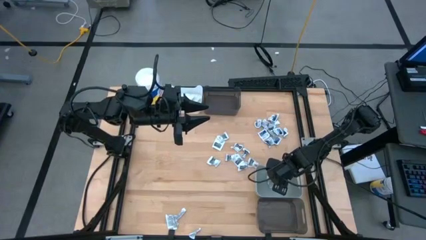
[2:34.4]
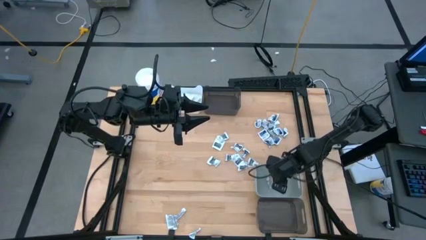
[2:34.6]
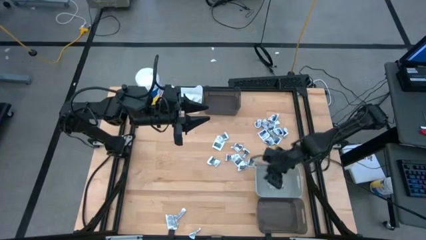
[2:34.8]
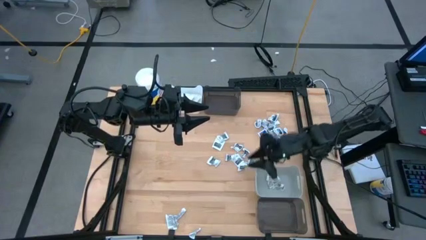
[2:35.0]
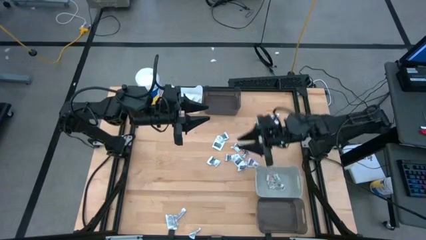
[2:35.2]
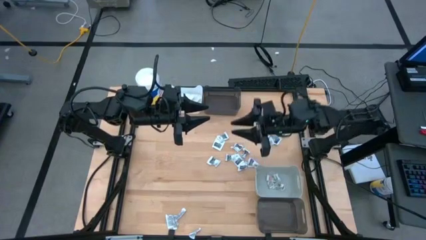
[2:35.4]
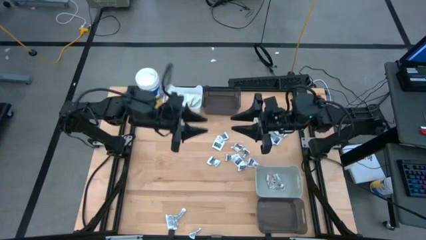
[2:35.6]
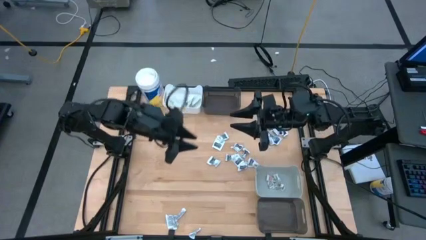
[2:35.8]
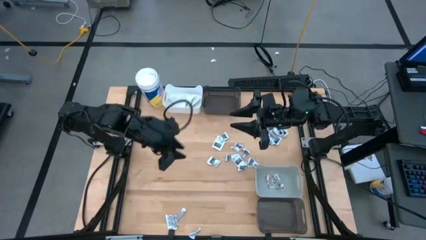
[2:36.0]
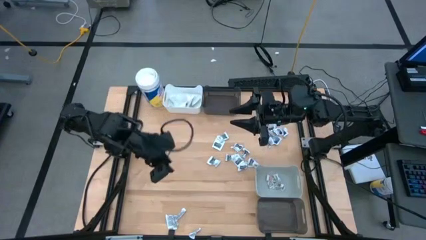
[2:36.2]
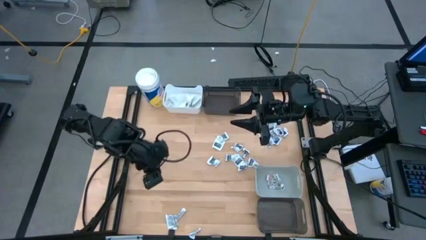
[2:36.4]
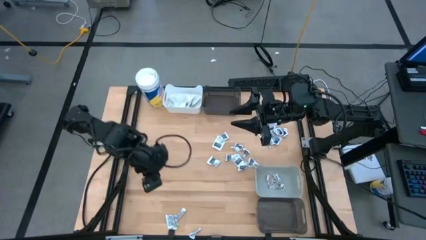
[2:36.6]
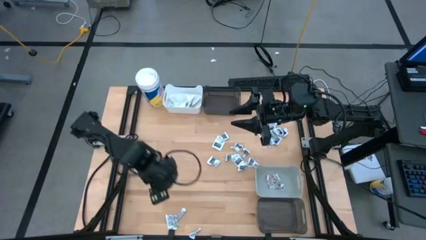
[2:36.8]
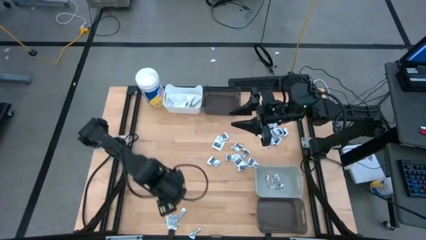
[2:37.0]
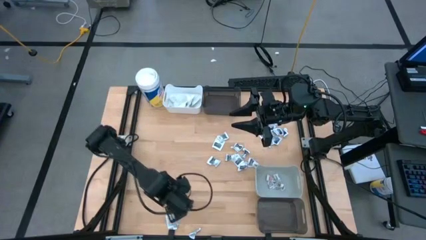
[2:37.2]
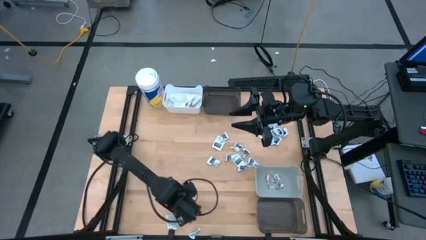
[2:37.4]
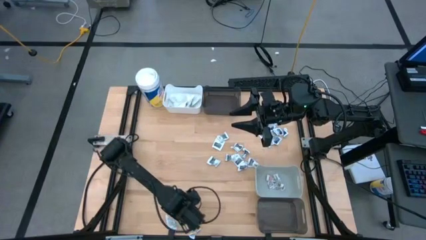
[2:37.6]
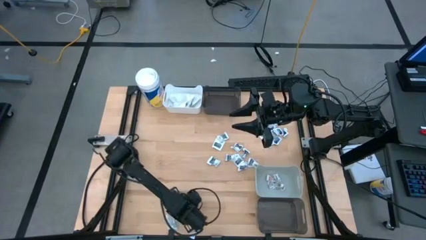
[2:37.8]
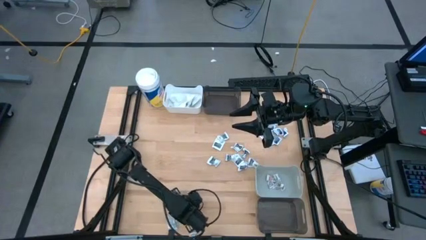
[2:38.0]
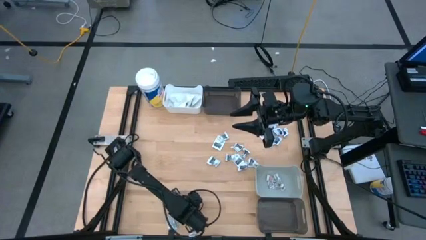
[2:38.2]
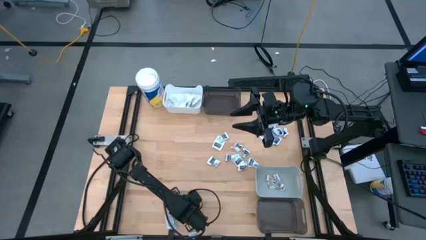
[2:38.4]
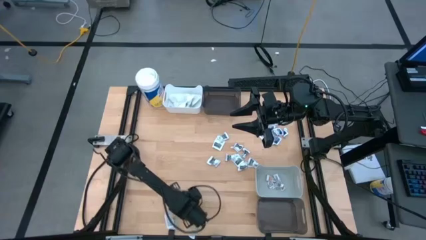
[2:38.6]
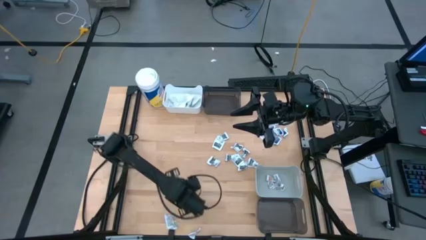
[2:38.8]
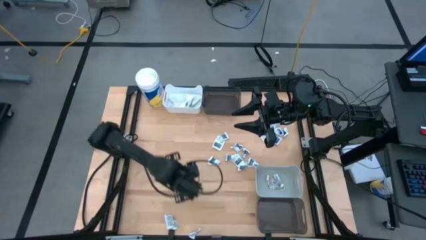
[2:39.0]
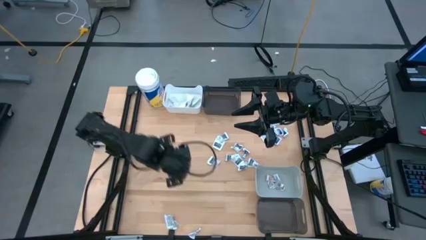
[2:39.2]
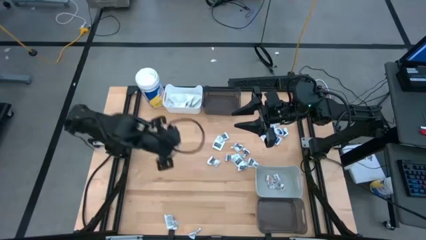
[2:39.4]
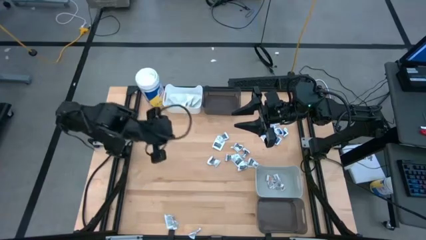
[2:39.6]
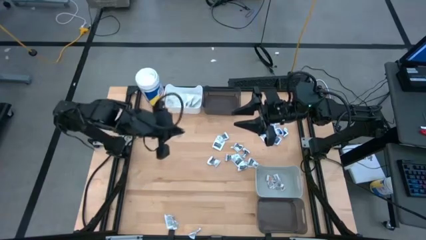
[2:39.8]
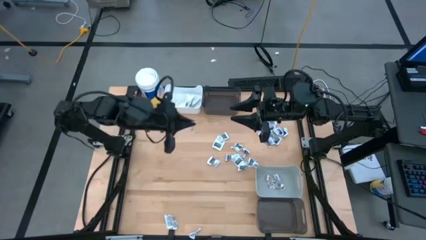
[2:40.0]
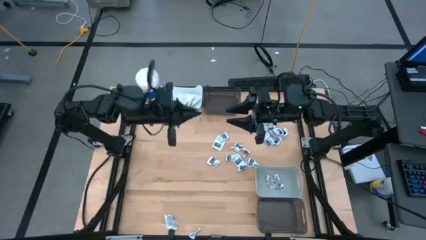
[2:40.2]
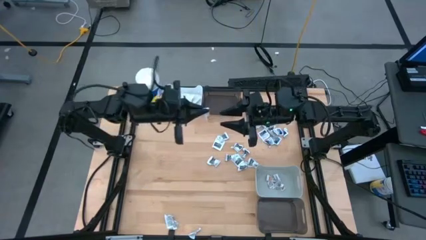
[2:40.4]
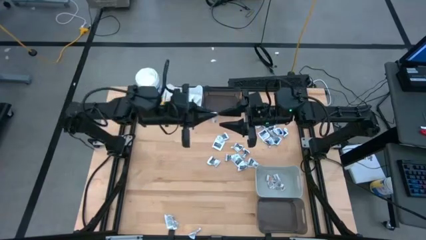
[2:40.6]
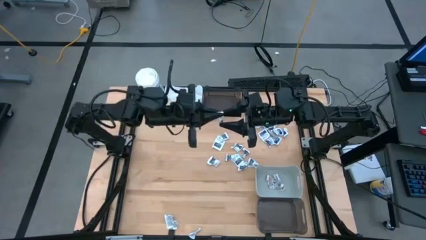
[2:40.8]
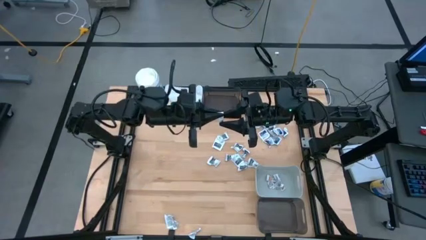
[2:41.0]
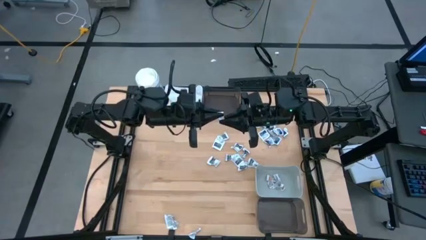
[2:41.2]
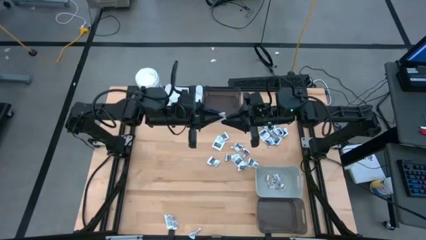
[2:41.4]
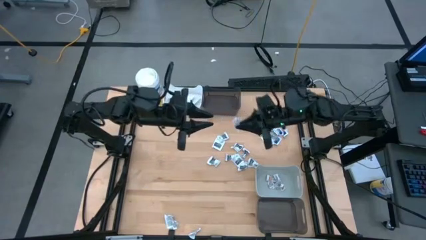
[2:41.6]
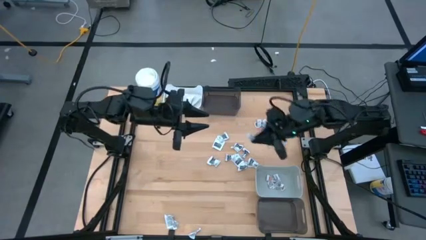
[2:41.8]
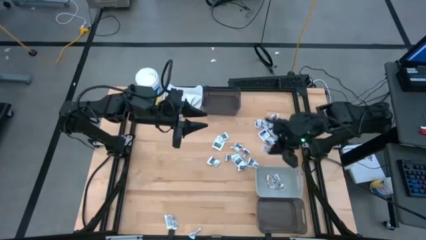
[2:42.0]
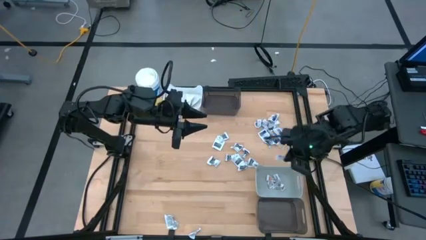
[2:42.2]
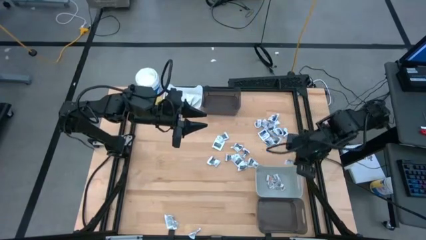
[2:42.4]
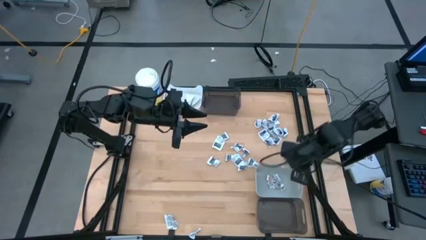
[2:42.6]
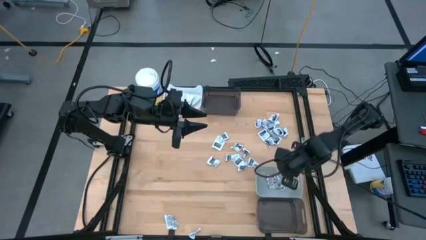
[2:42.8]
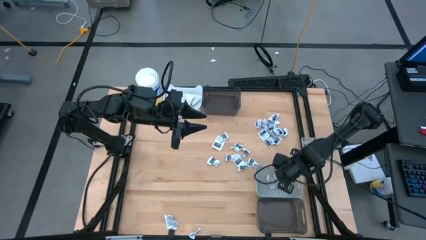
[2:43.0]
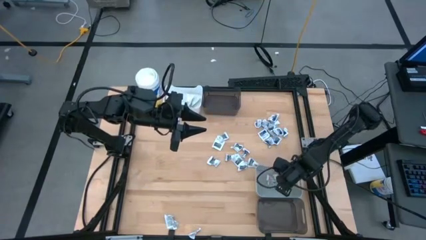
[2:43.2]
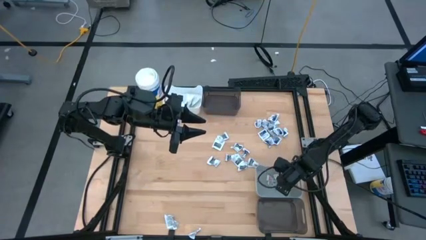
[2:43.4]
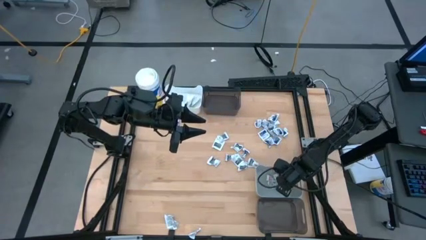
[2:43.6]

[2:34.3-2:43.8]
Task: Pick & Place First Aid Supplies
Put the orange ointment pack into the gray bin

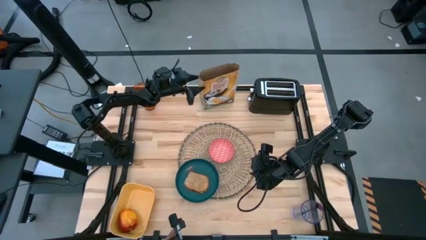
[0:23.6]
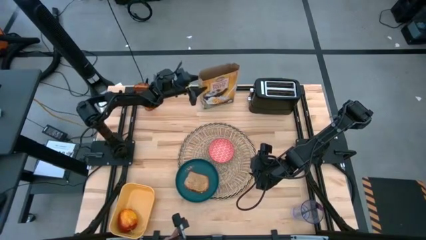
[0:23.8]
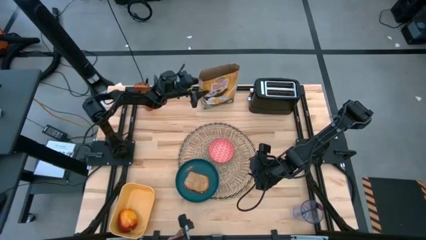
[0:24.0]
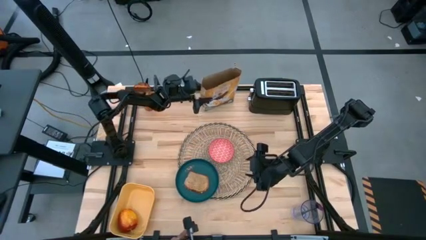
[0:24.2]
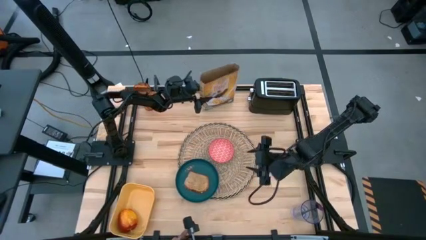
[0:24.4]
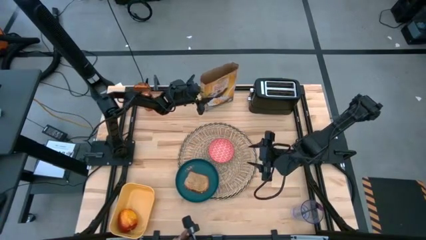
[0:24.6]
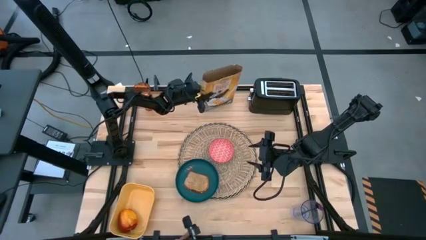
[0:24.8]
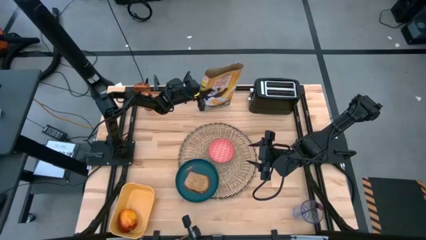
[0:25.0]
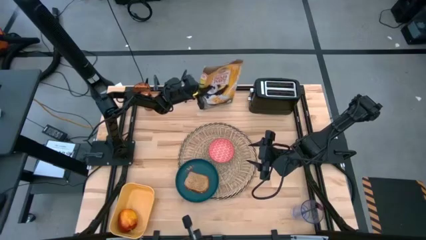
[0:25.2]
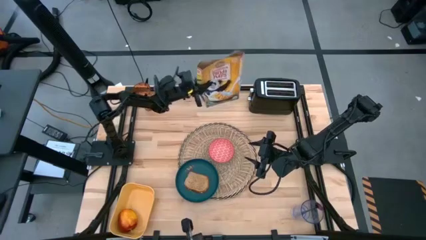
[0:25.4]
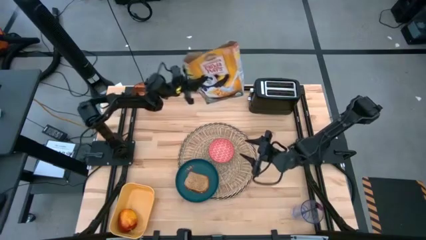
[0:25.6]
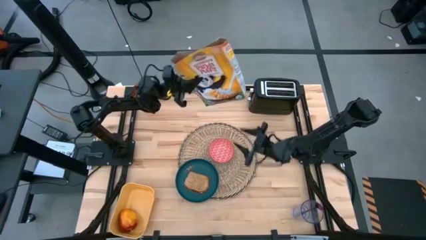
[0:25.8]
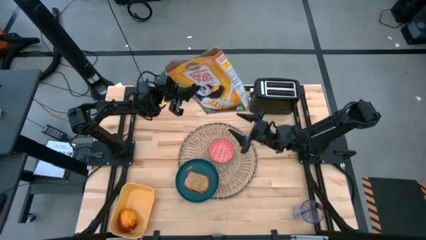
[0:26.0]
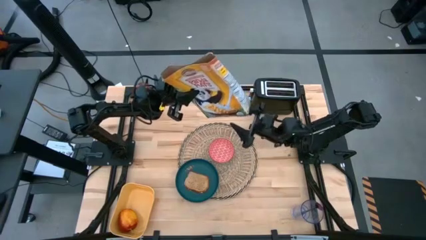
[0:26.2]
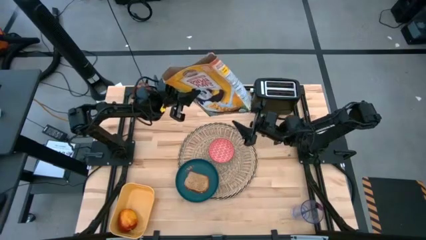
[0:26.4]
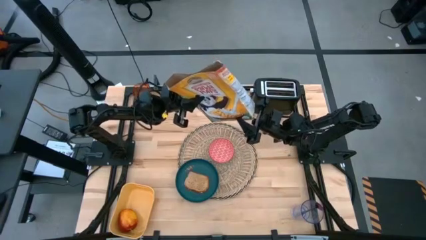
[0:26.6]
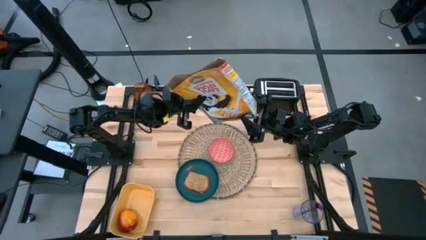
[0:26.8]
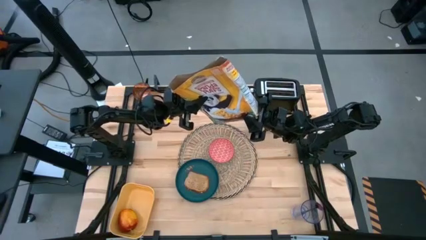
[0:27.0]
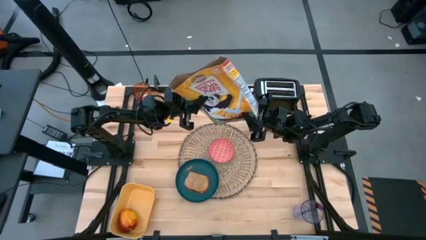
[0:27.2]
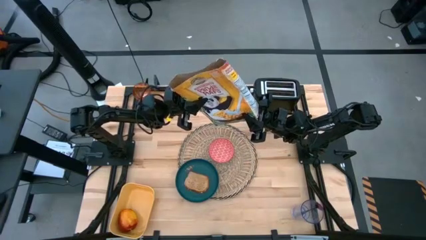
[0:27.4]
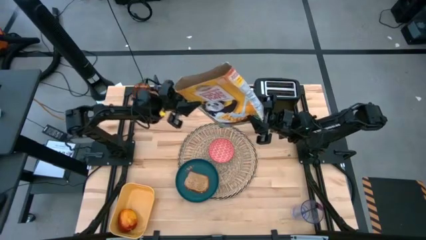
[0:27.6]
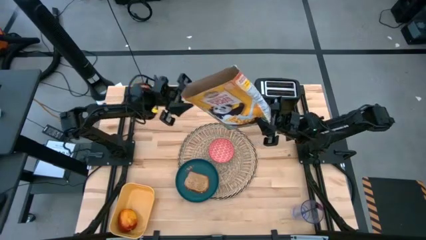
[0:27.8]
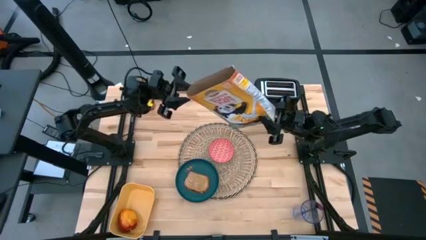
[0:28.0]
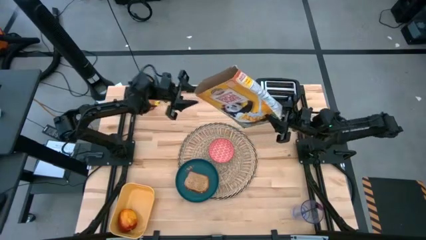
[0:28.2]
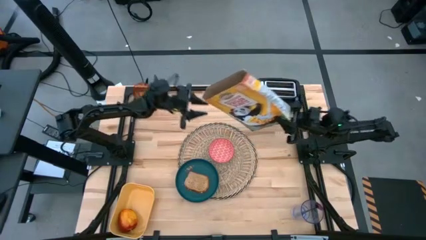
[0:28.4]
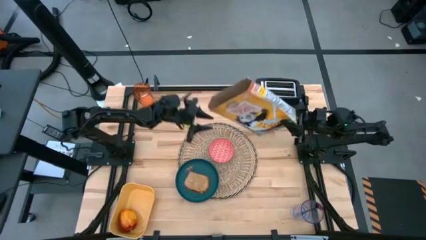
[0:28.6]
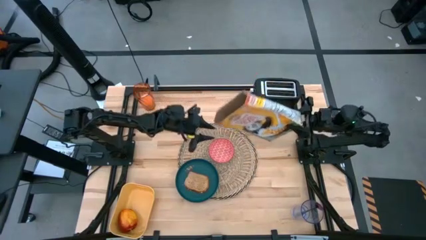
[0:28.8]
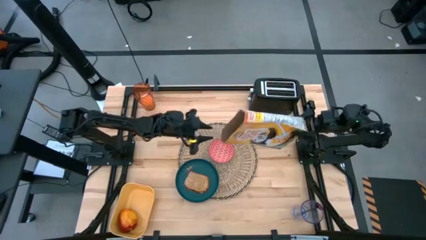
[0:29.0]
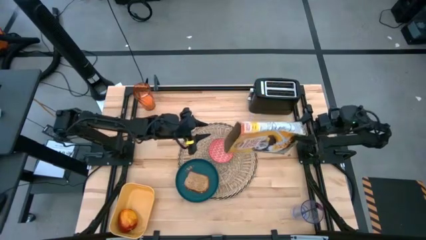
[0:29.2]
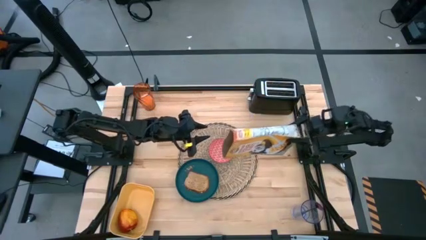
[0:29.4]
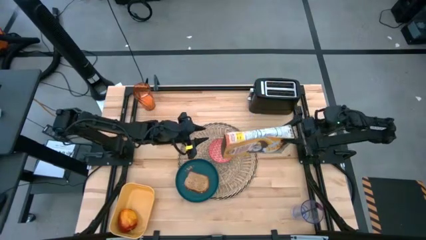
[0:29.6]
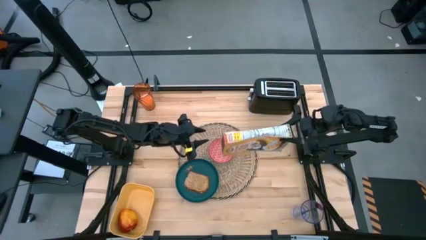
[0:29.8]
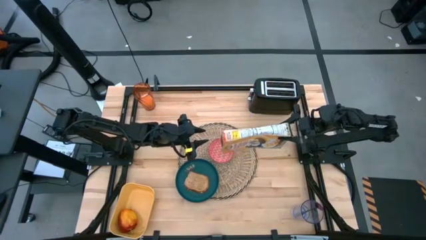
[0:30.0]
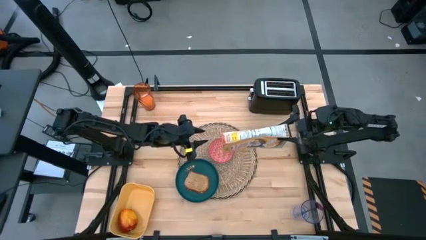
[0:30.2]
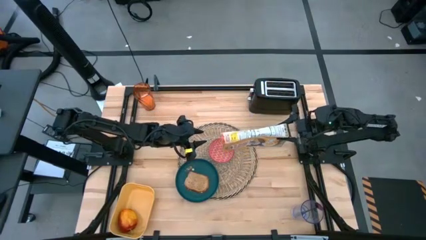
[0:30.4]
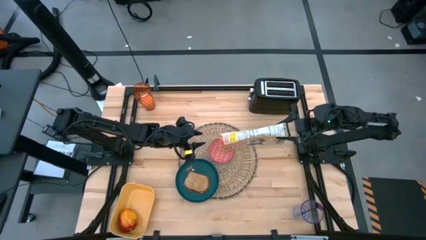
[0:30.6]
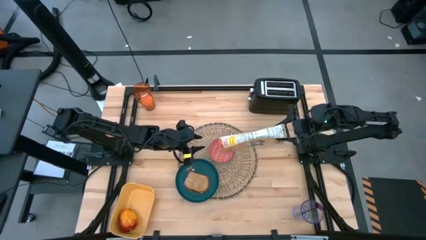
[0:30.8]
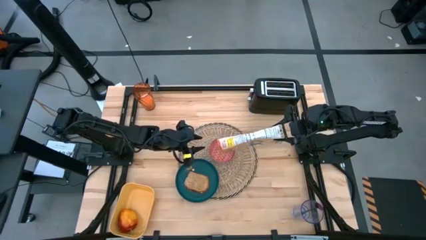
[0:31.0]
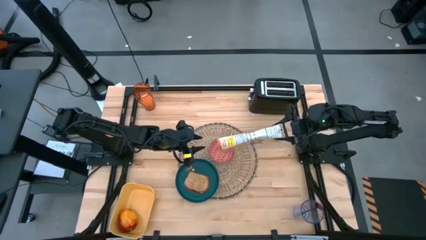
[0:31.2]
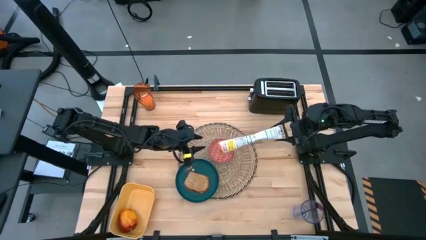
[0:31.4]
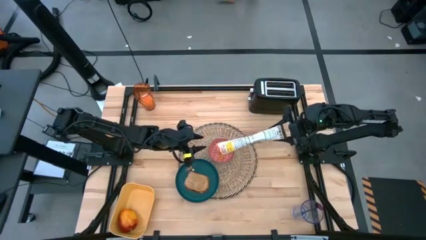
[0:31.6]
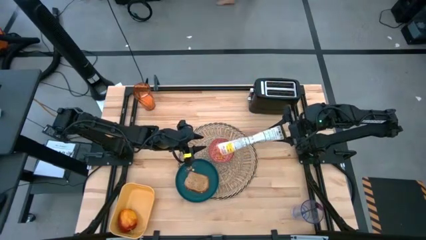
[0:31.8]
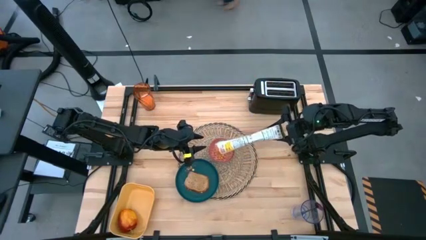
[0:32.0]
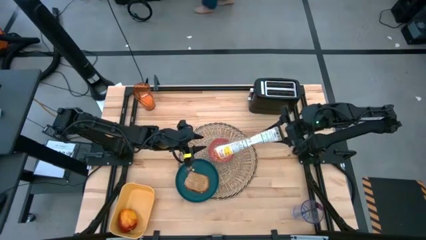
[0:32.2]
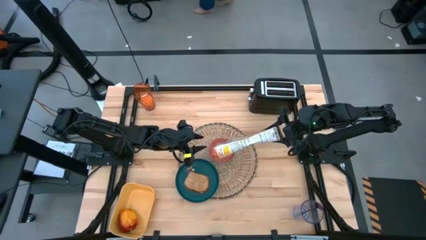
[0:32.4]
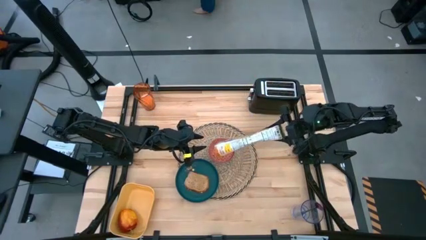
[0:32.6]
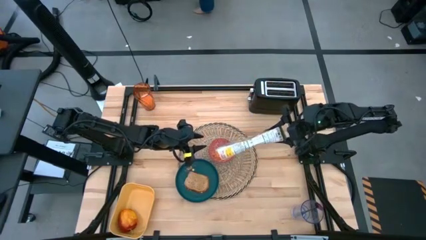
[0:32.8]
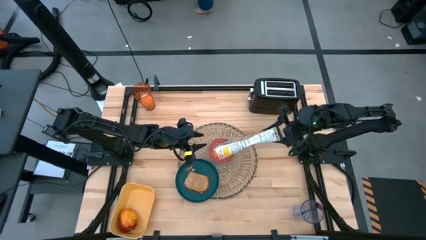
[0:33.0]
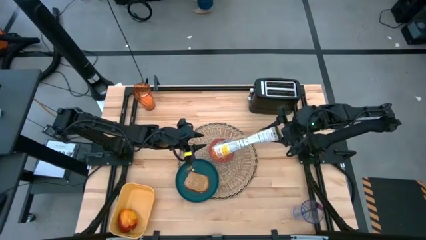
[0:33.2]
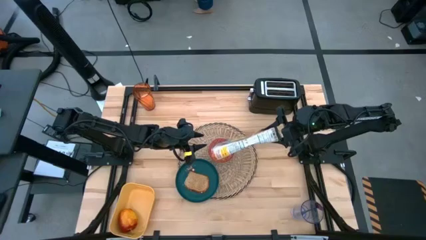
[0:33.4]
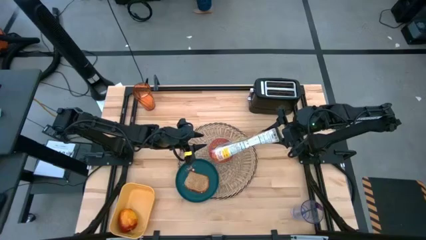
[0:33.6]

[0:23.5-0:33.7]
Task: Arrange a breakfast setting
Pour the cereal from the yellow cereal box into the red patterned bowl
